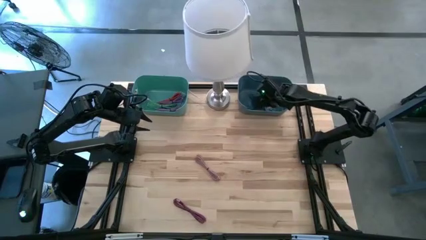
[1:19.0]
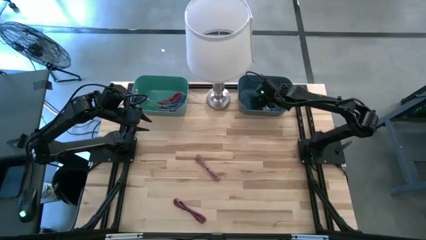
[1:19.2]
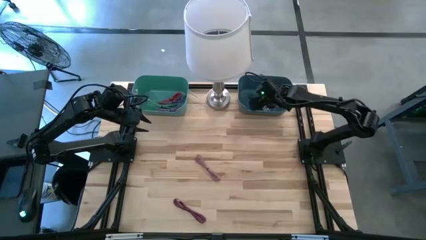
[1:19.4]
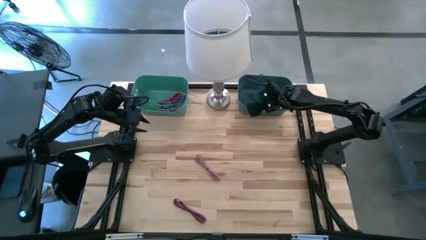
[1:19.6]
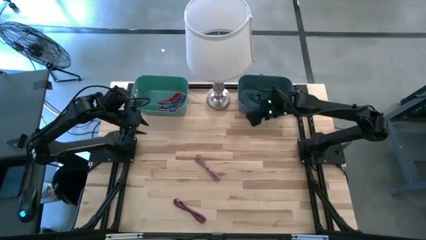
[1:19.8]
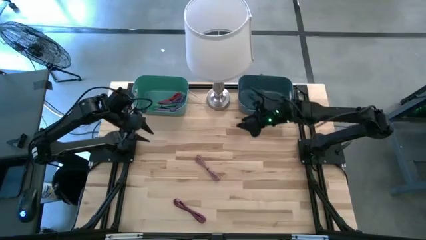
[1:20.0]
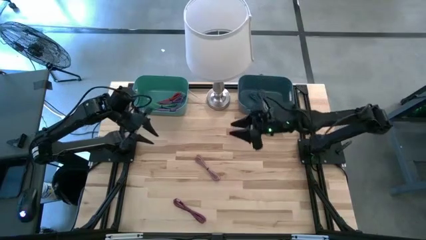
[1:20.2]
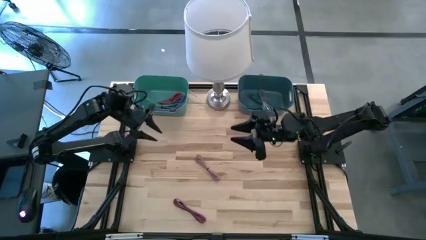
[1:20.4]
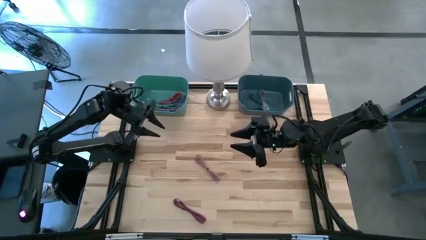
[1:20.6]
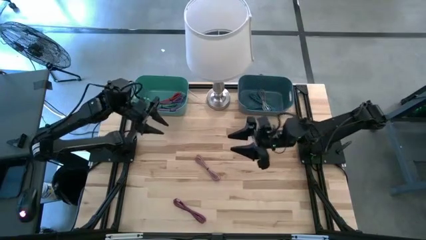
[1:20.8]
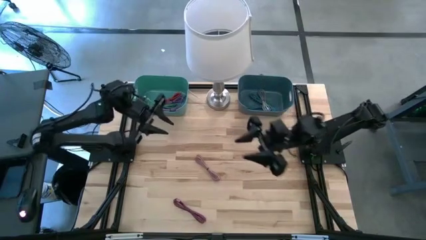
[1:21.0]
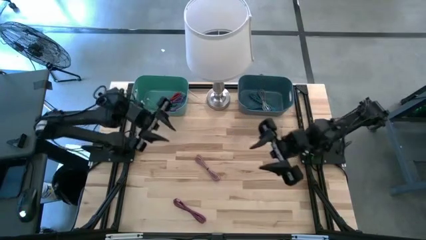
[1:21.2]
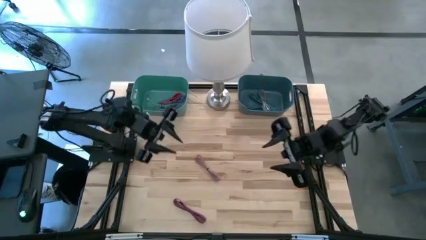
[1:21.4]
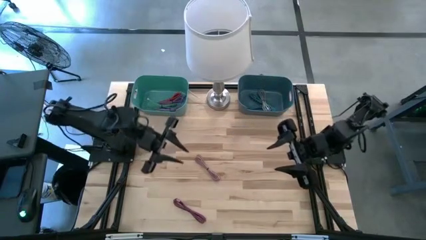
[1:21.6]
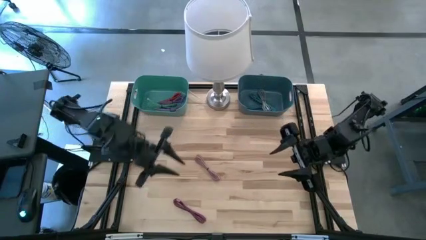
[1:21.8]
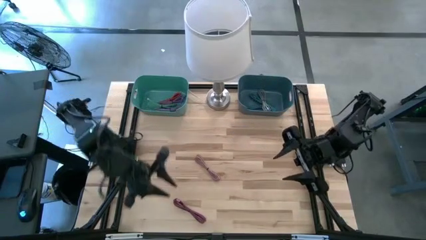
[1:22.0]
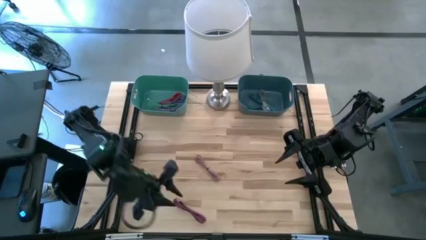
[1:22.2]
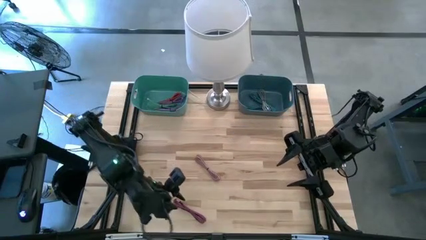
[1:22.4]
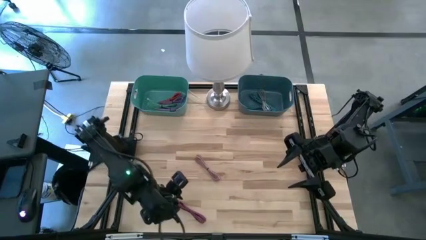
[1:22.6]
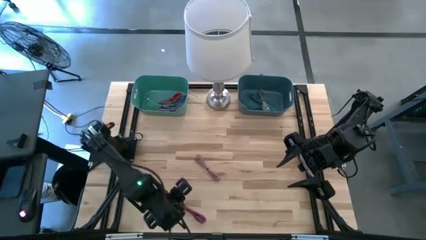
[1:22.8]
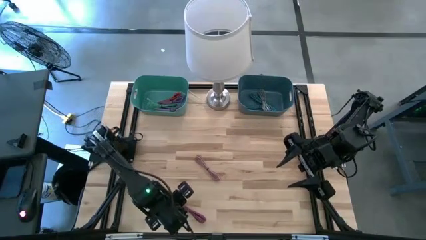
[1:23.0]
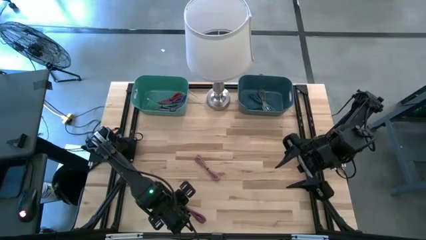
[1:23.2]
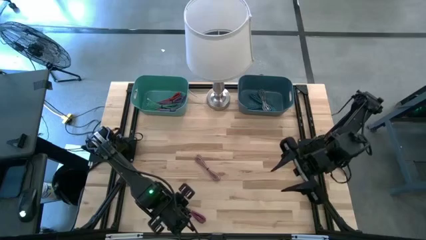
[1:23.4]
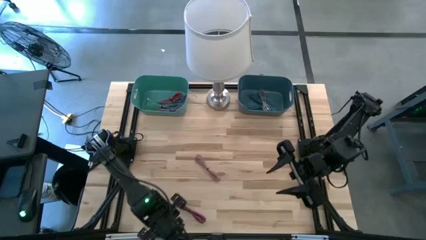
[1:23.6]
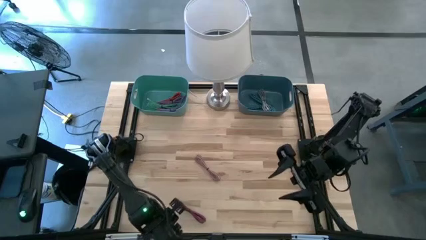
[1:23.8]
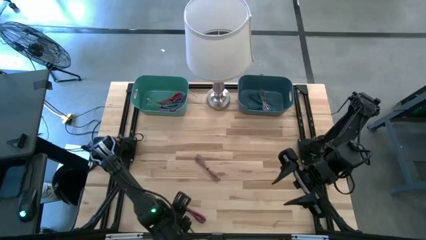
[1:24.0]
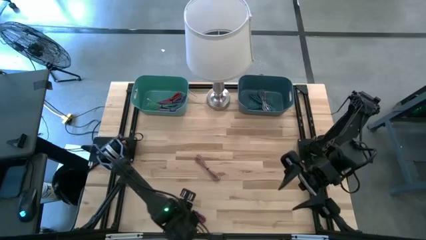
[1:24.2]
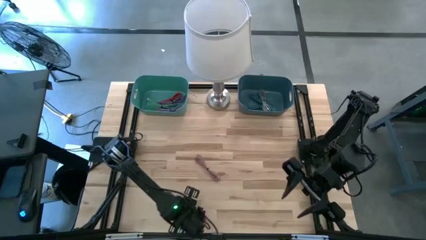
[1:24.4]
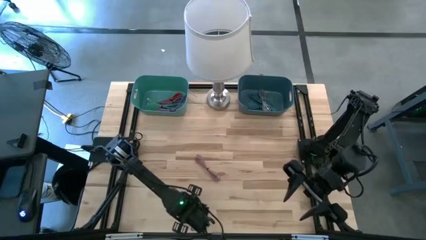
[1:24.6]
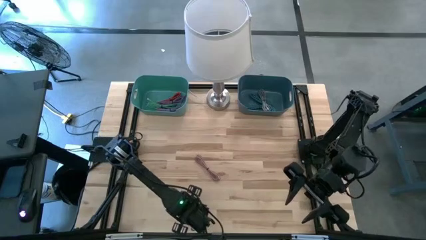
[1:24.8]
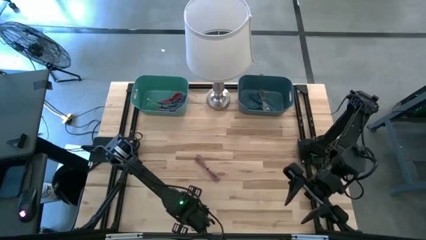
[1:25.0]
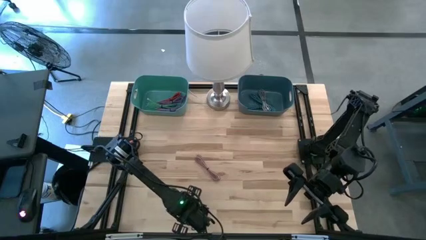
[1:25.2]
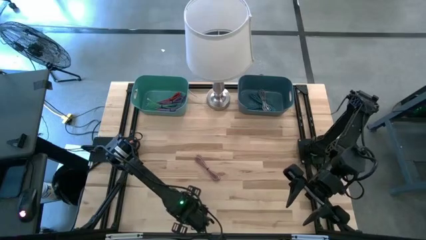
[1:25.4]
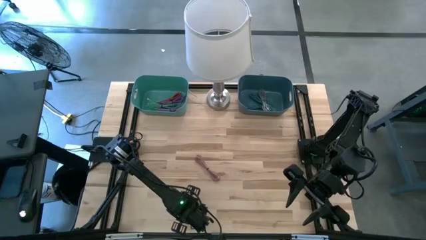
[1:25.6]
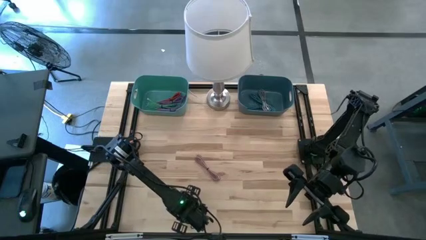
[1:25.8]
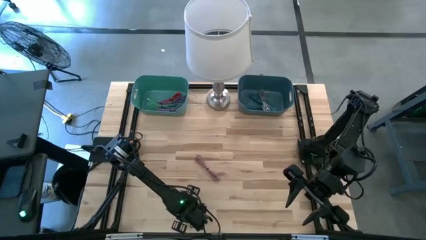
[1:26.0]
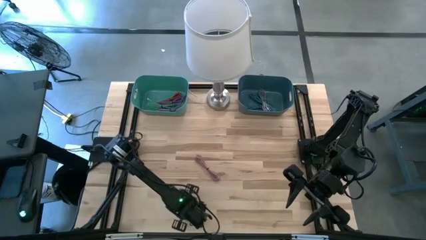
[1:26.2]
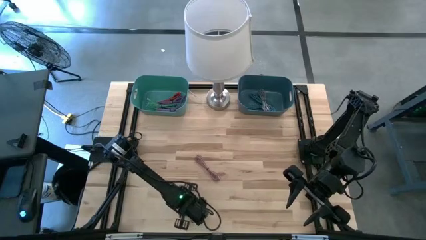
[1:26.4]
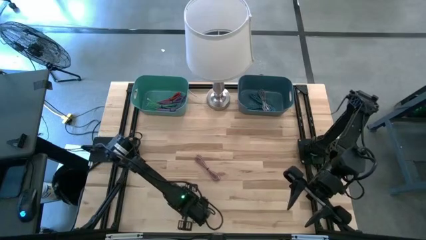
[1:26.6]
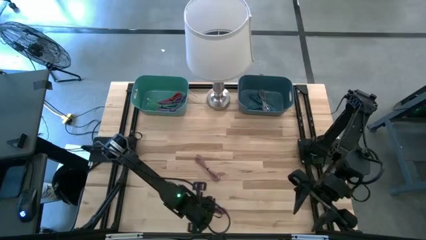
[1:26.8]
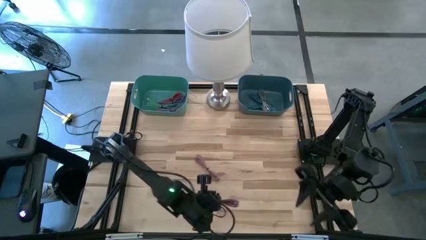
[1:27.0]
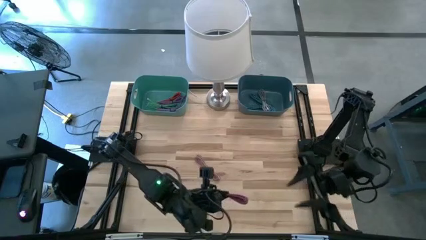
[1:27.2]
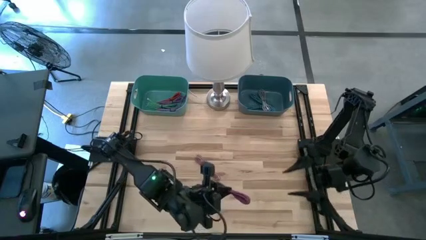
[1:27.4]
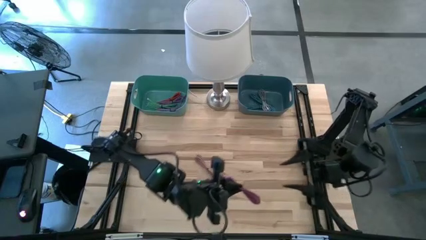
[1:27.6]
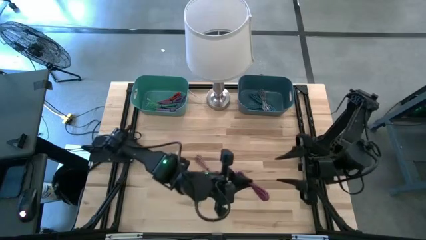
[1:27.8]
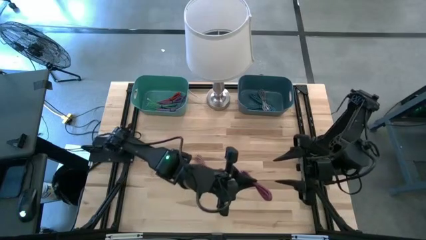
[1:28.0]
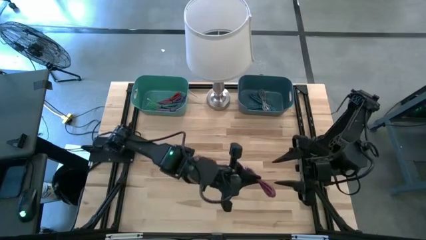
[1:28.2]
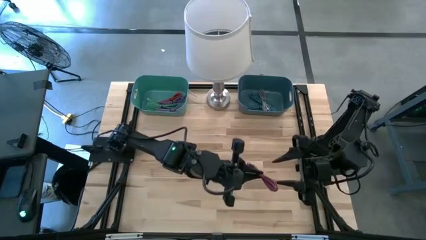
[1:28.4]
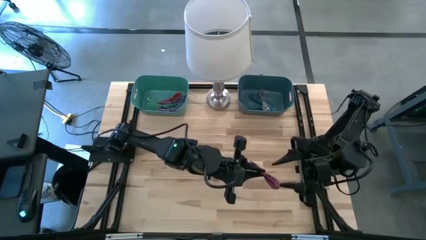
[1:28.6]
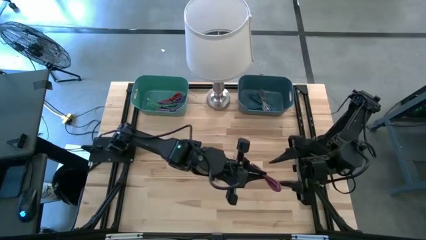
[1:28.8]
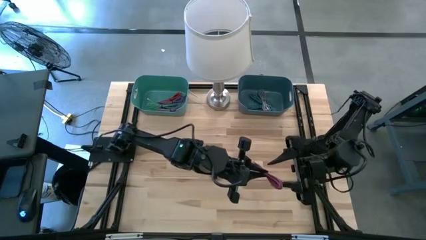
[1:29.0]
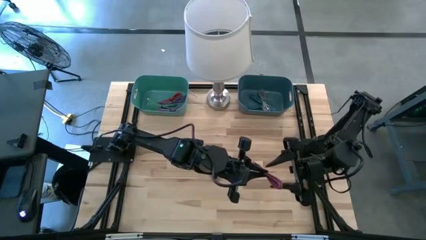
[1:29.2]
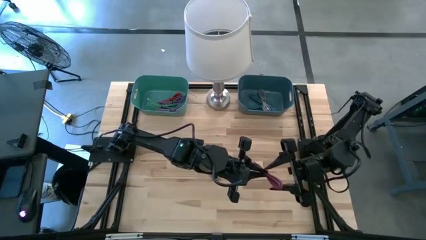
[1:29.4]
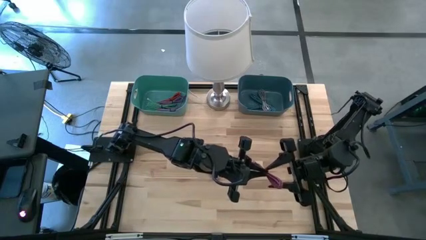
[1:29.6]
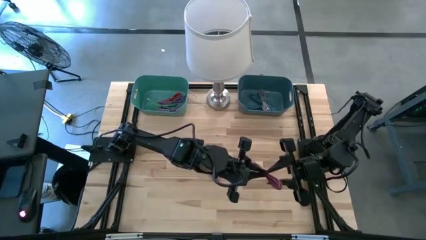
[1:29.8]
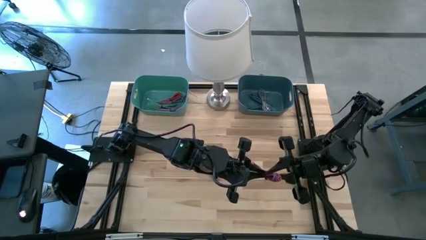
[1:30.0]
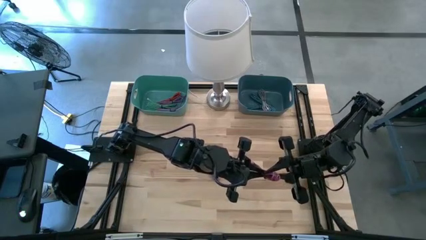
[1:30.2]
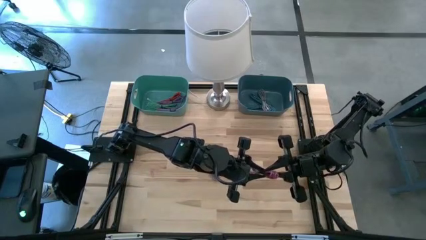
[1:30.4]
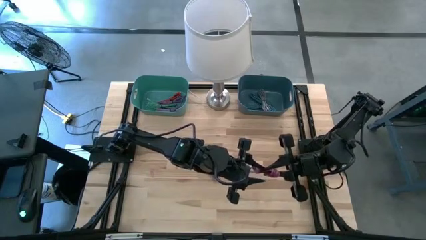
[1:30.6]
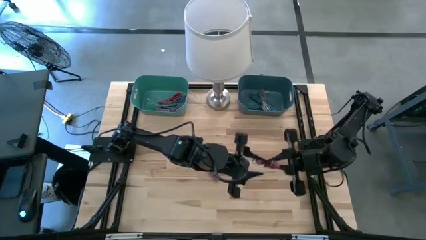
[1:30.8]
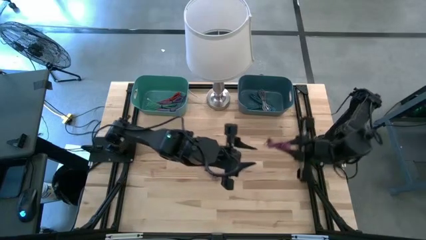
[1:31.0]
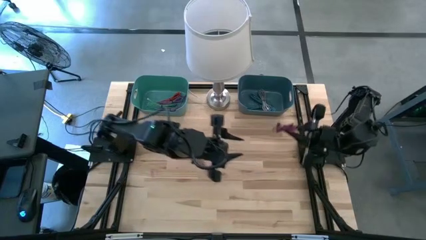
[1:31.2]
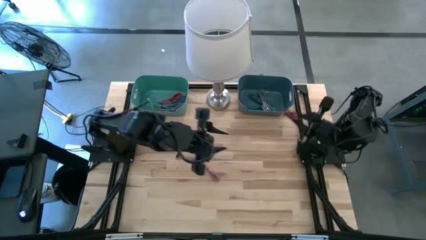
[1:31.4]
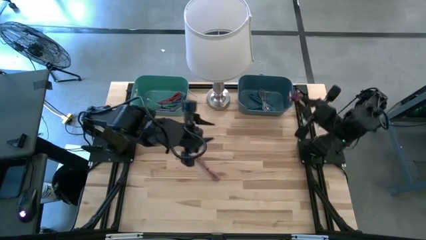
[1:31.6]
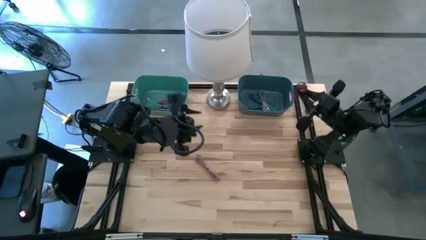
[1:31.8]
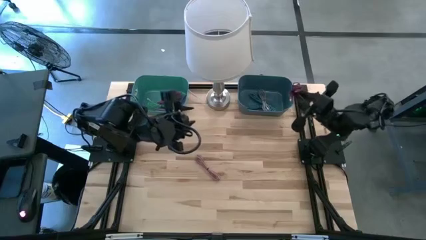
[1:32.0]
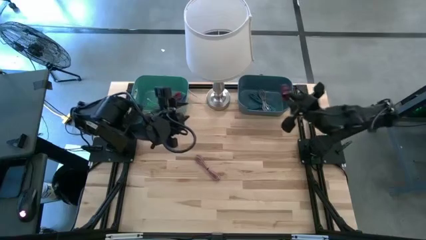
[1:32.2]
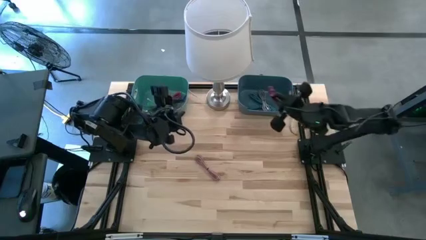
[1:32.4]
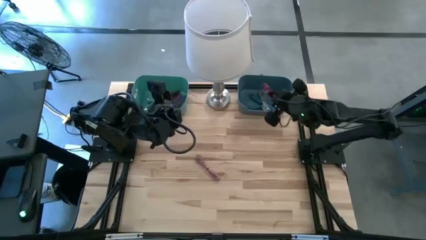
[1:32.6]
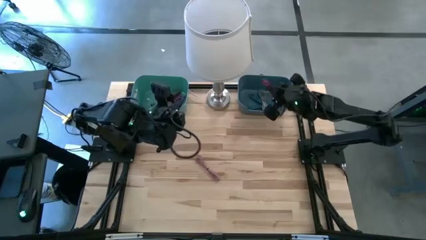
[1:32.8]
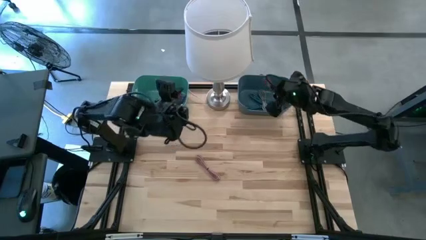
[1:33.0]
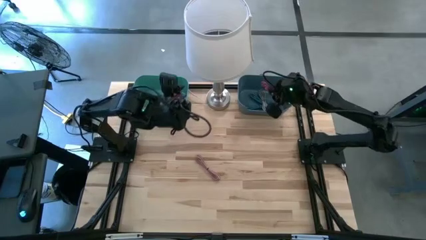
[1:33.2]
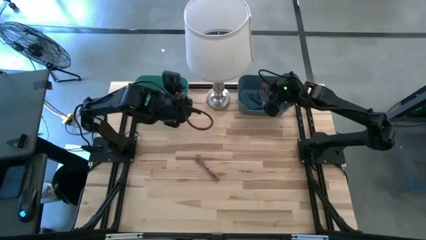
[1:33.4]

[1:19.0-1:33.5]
Task: Pick & Place USB Port
Put the pink charger cable into the blue bin
